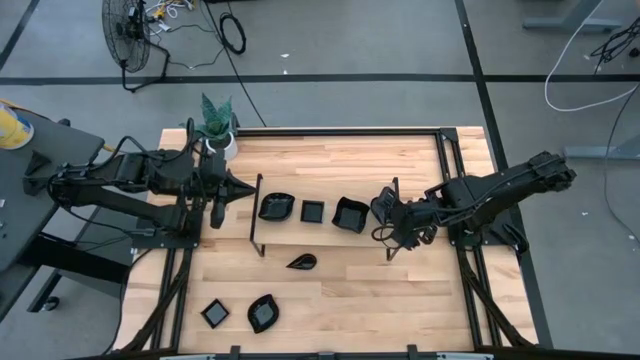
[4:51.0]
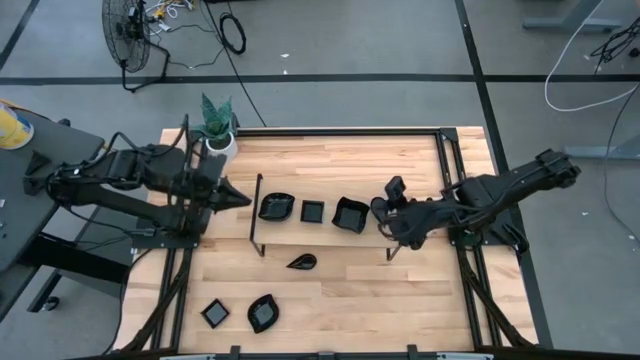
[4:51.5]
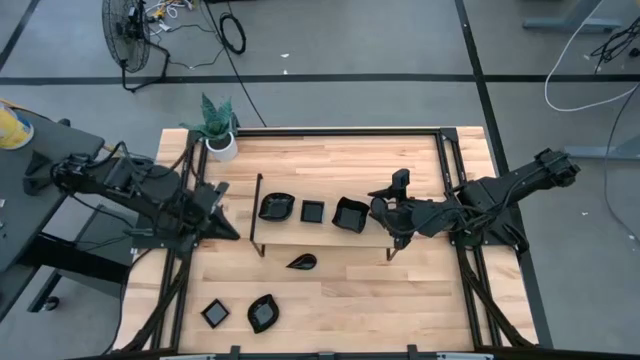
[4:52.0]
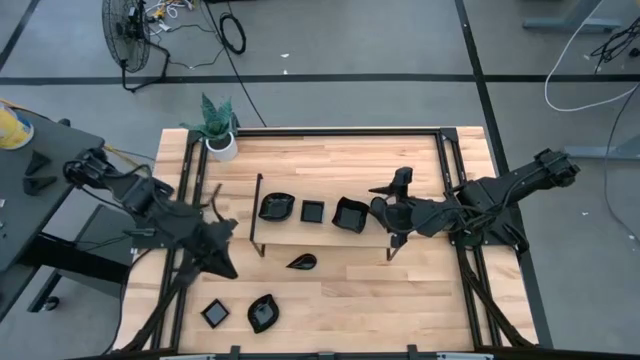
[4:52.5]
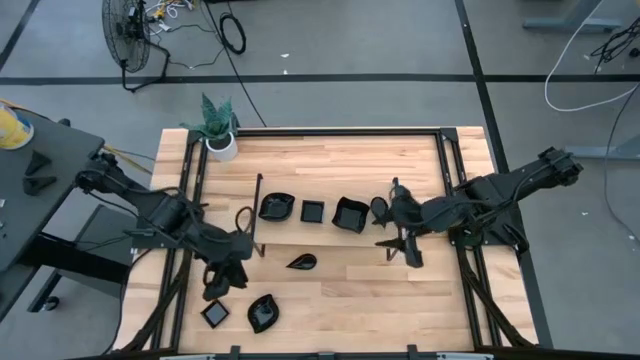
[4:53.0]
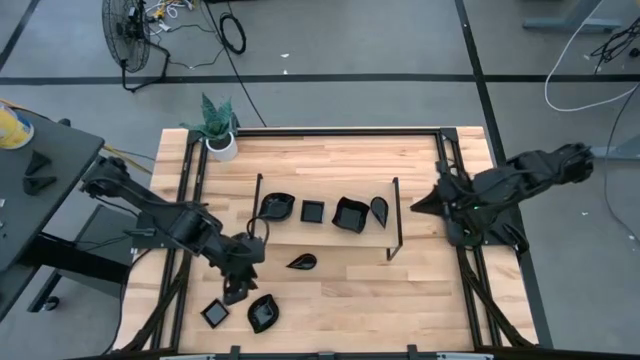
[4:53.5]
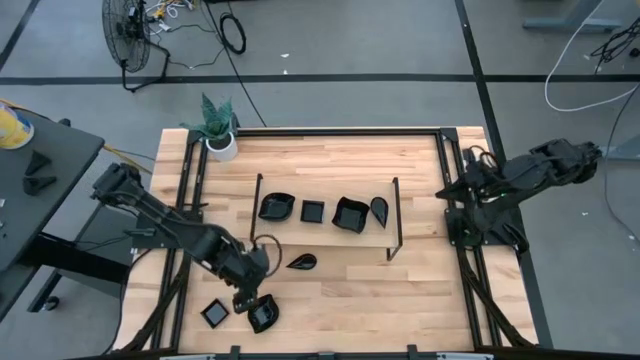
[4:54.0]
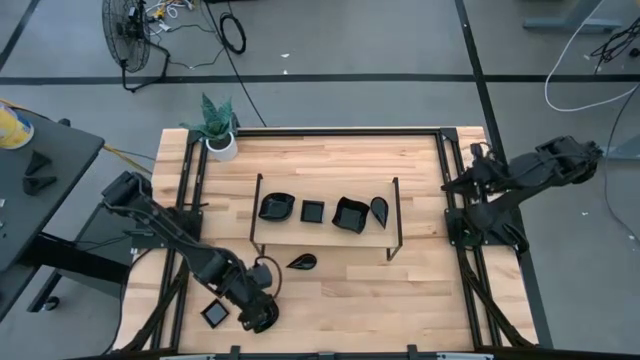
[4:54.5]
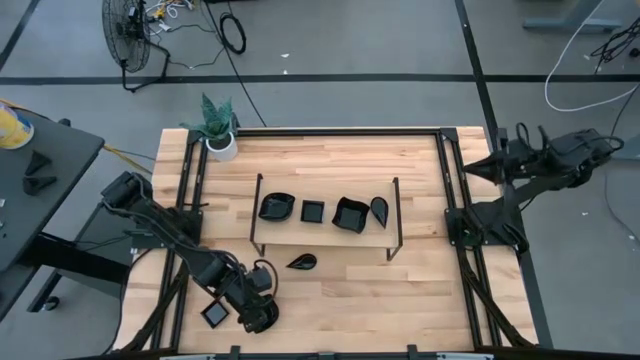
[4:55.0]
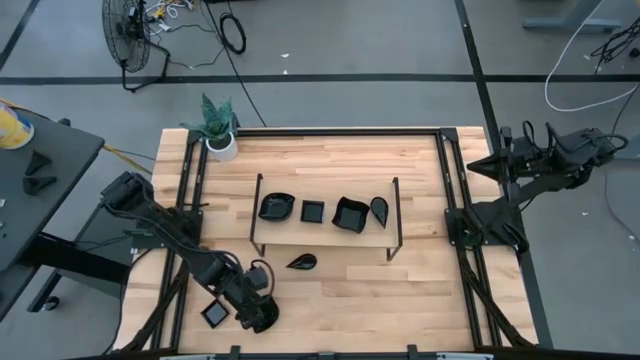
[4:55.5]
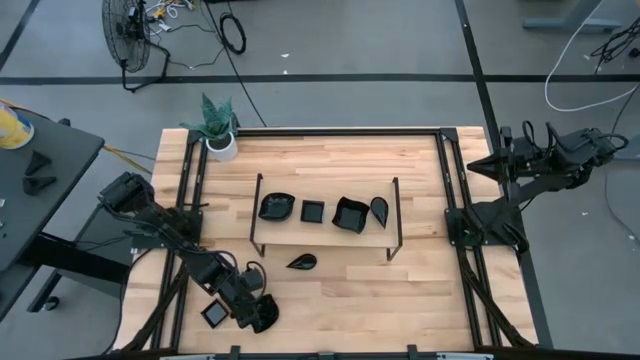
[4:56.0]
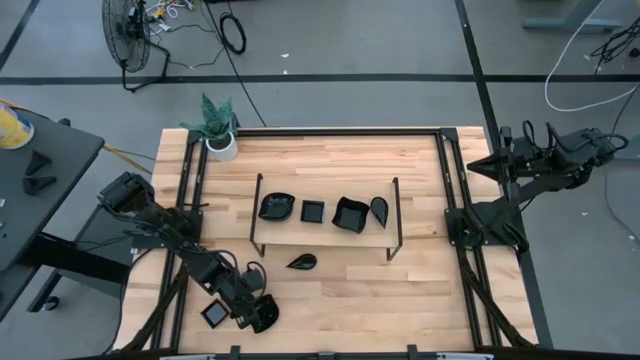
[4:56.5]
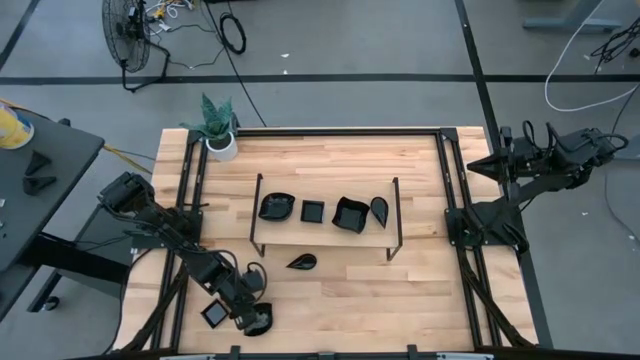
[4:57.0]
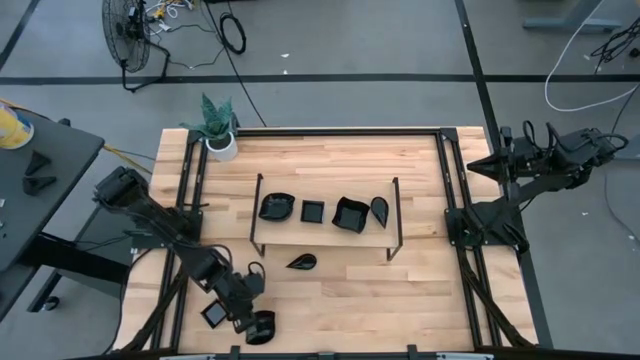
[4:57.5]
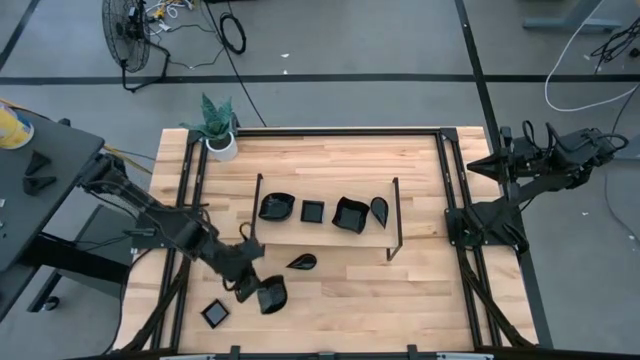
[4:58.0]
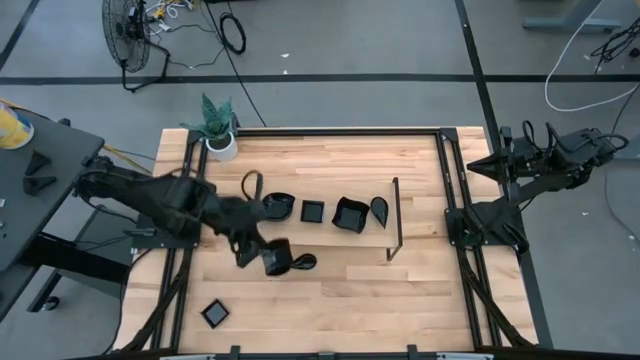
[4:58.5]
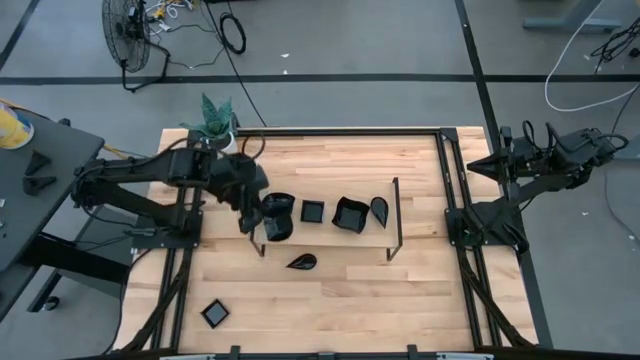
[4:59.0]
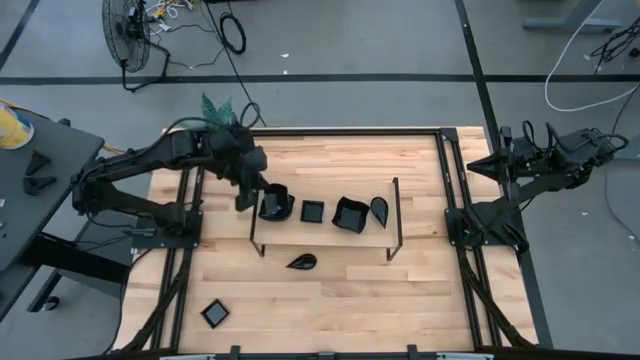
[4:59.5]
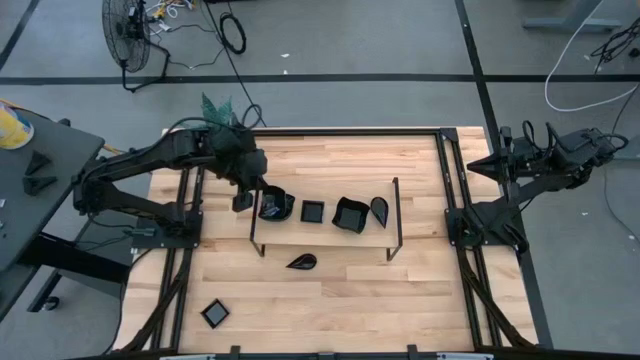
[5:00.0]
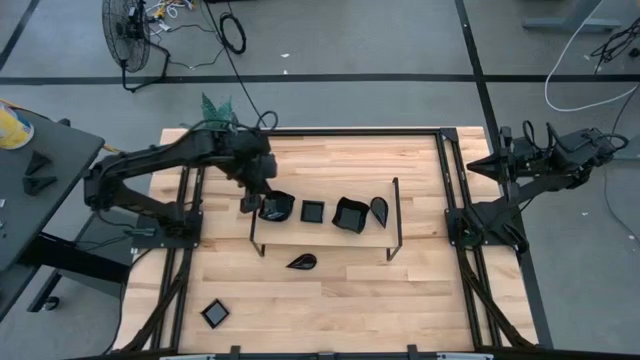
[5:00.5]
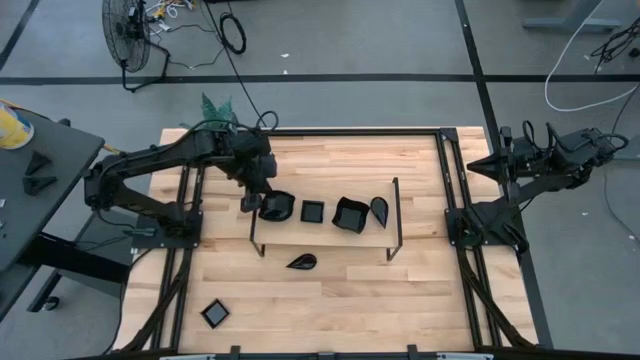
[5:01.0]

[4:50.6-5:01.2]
Task: Pick & Place Mini shaped plates
Stack the leaf shaped plate on top of the leaf shaped plate on the shelf

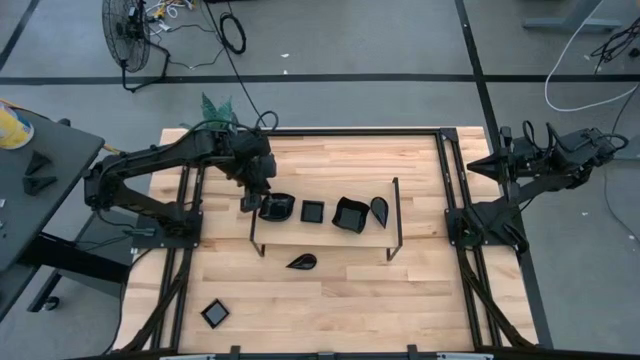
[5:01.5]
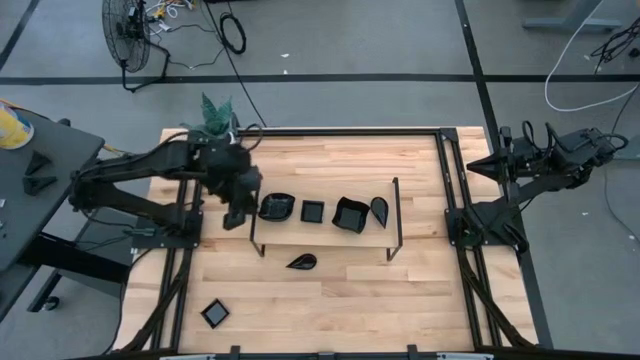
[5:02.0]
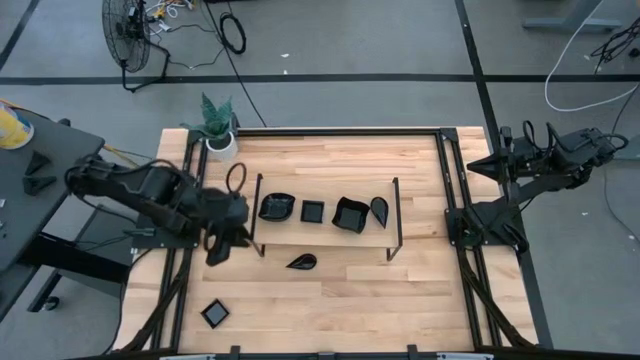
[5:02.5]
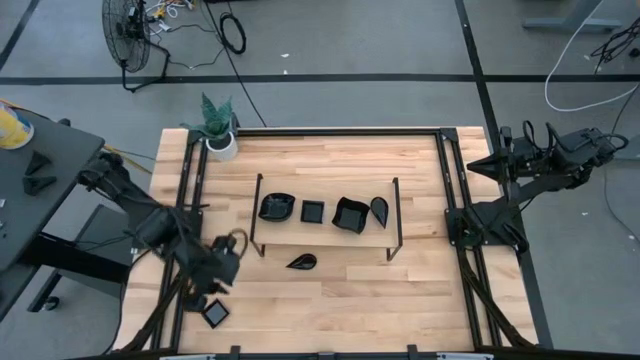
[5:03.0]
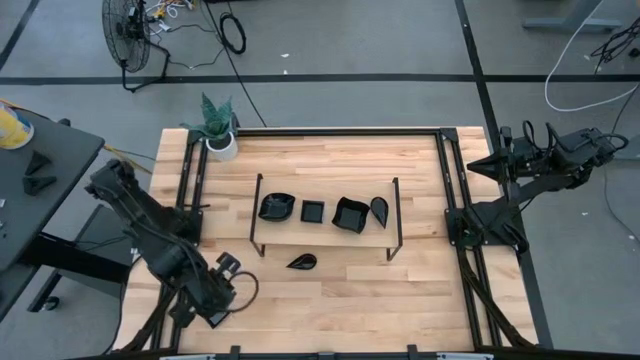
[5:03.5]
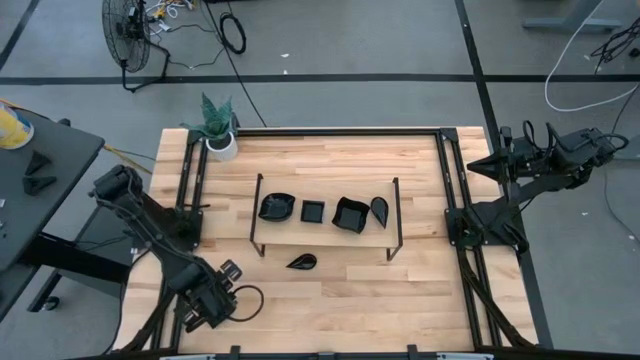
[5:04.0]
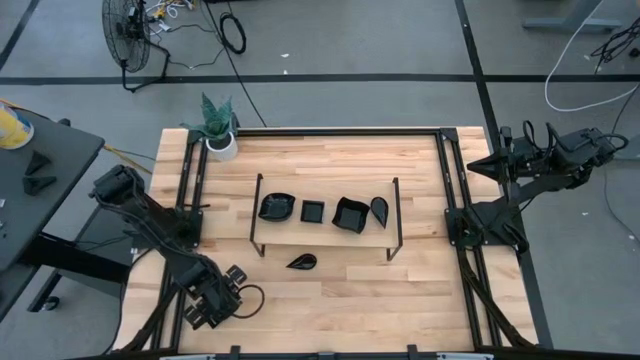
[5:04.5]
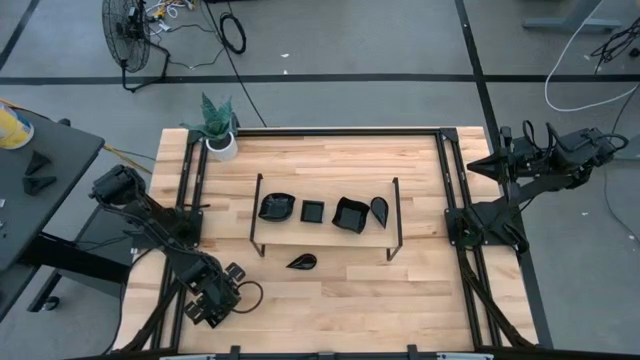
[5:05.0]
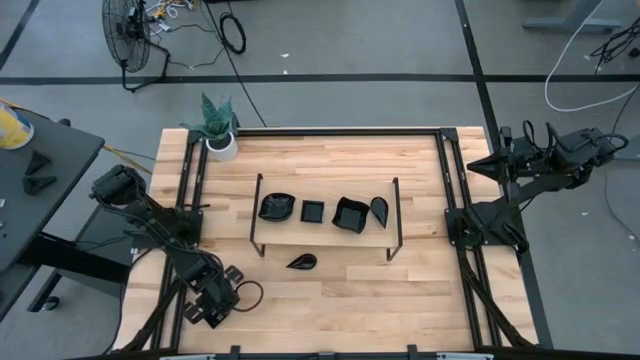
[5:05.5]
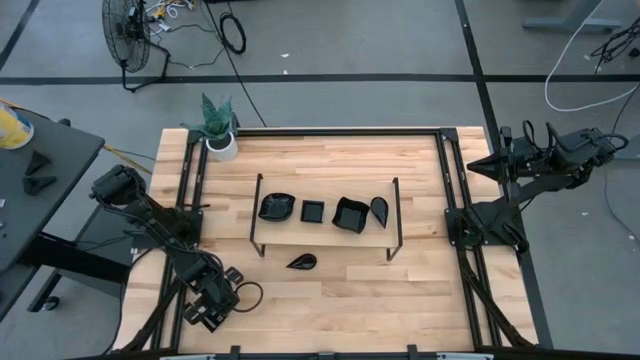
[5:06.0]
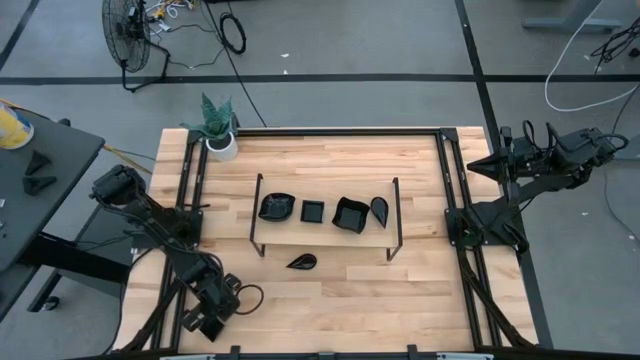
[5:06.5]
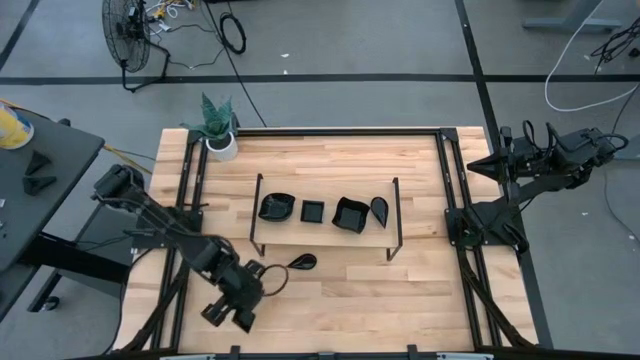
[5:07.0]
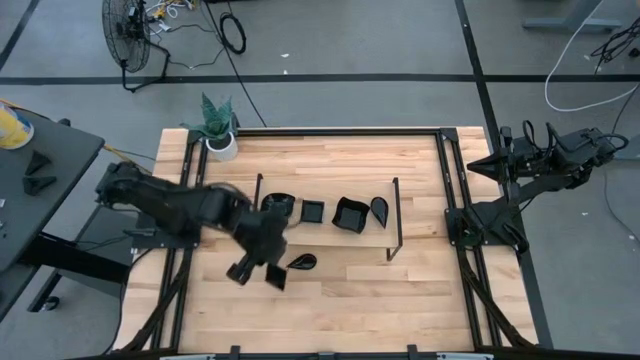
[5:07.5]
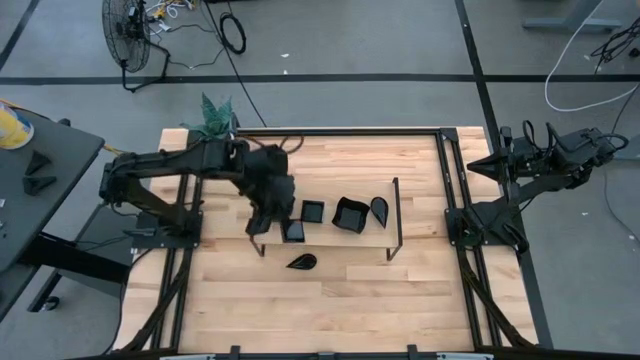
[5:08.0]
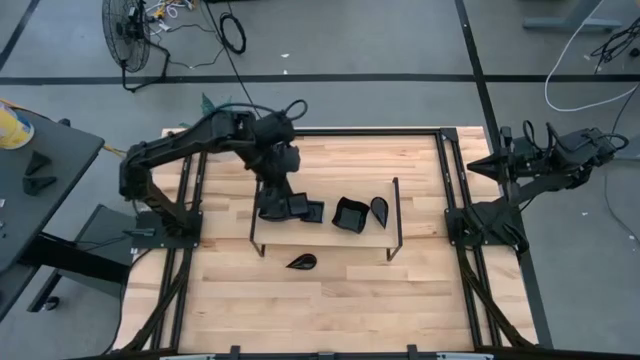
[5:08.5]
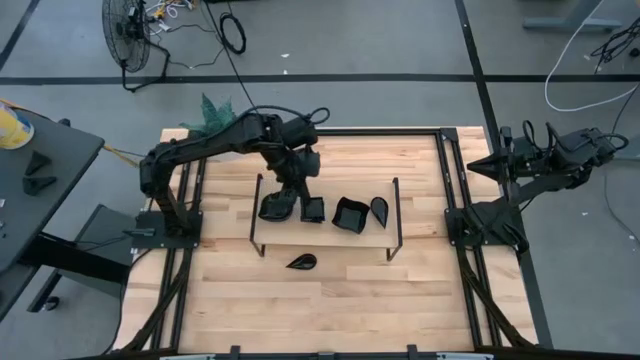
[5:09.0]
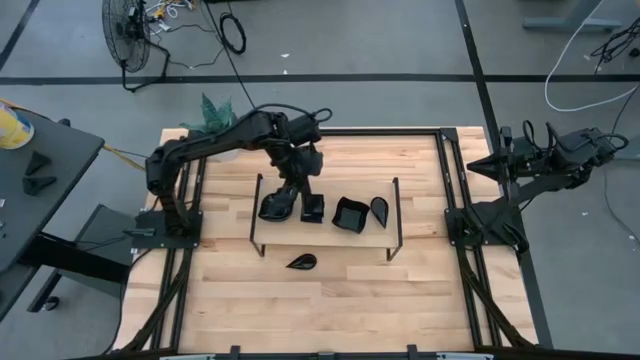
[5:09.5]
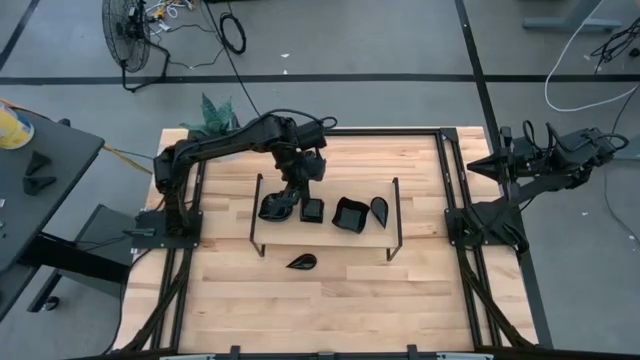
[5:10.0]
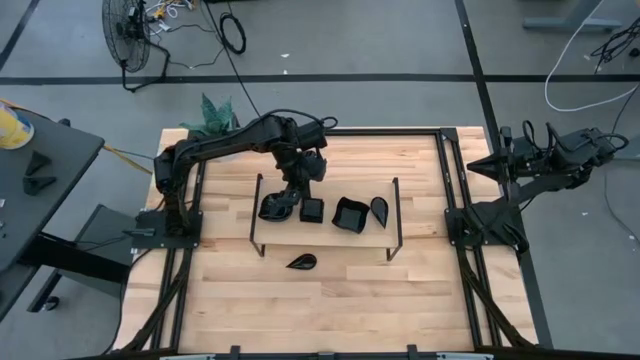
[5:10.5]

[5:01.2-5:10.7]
Stack the square plate on top of the square plate on the shelf

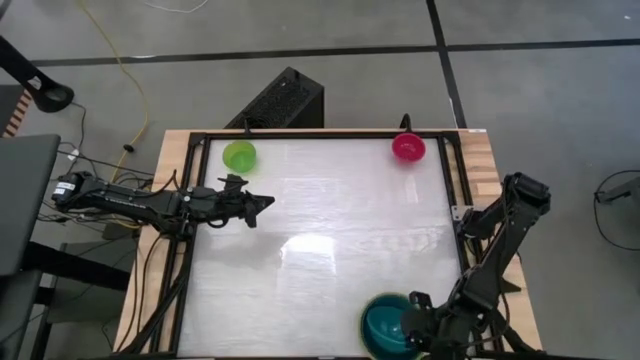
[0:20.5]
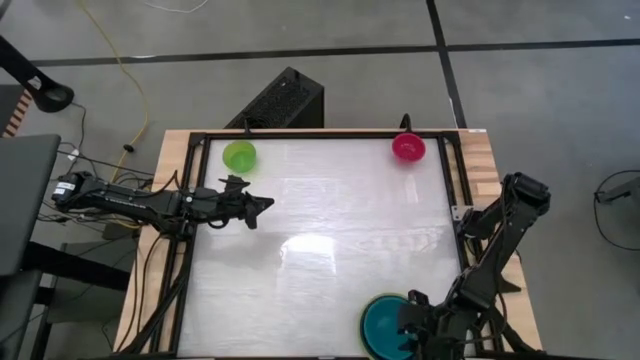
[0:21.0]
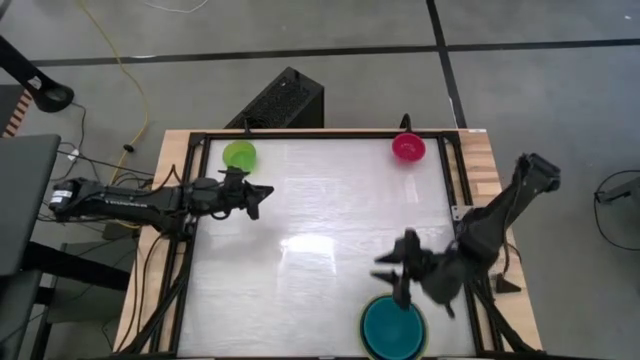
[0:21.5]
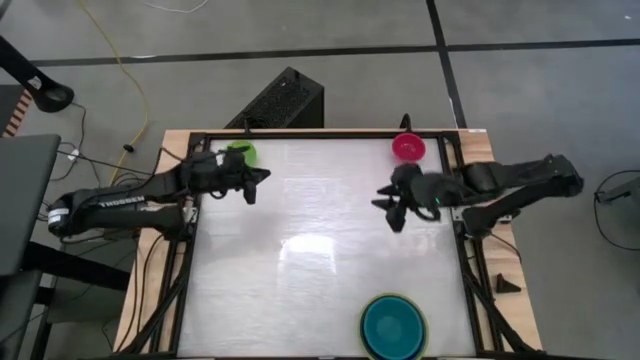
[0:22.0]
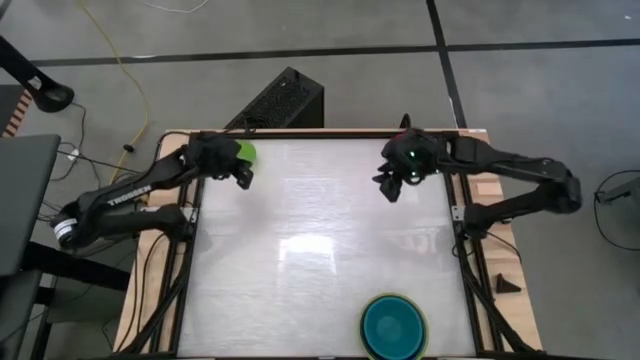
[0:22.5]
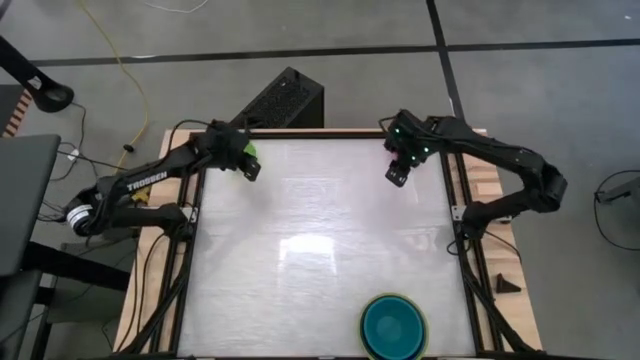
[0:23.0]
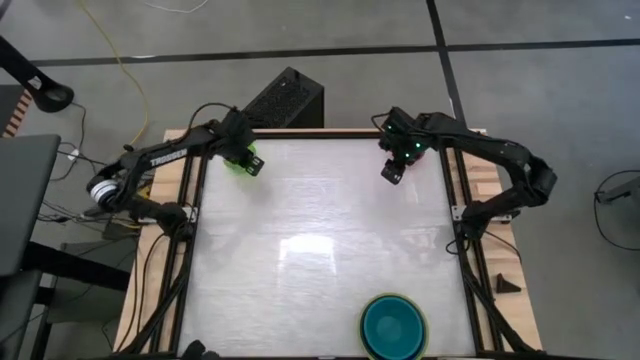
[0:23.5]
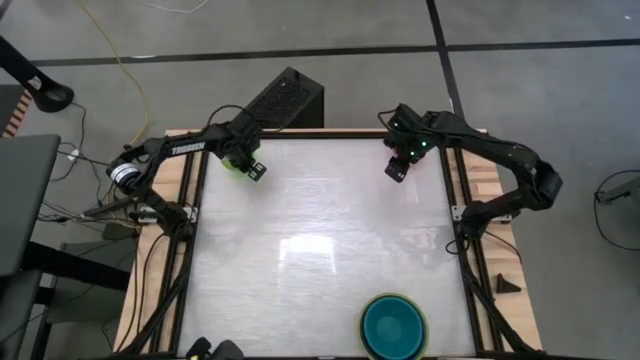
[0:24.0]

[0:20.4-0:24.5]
Task: Nest bowls inside each other by size order
Stack the light green bowl into the dark blue bowl
